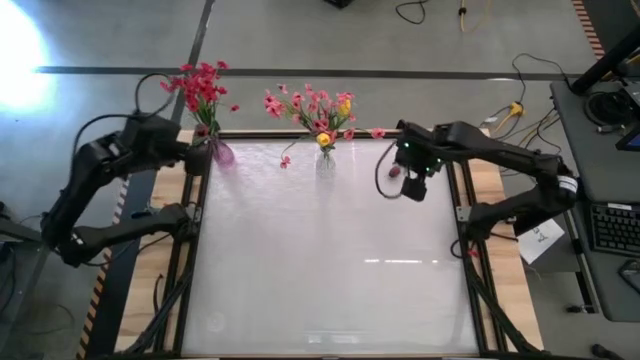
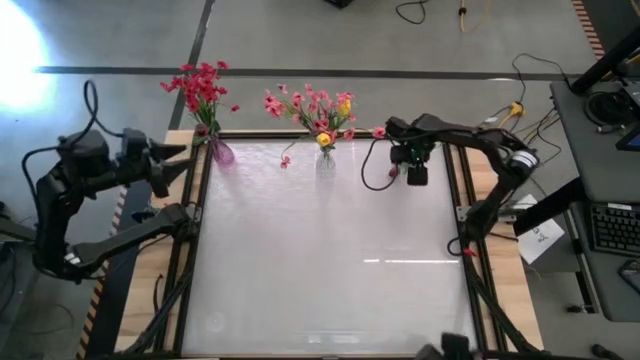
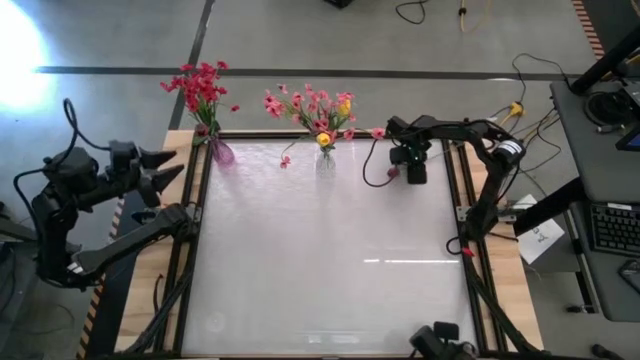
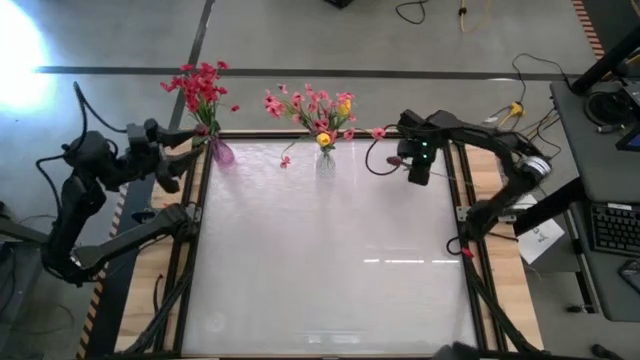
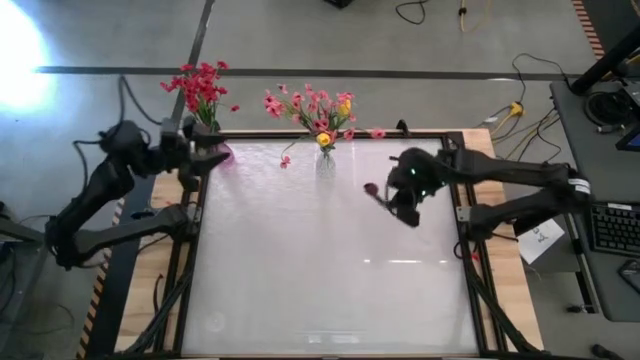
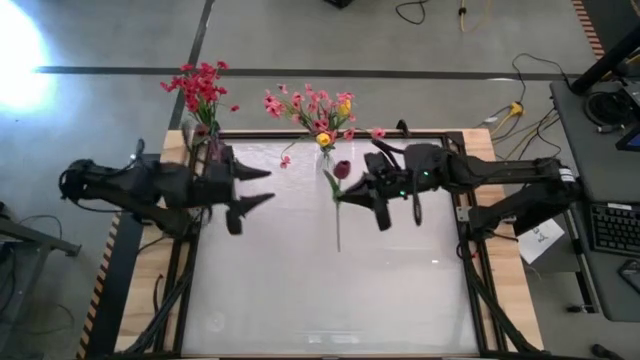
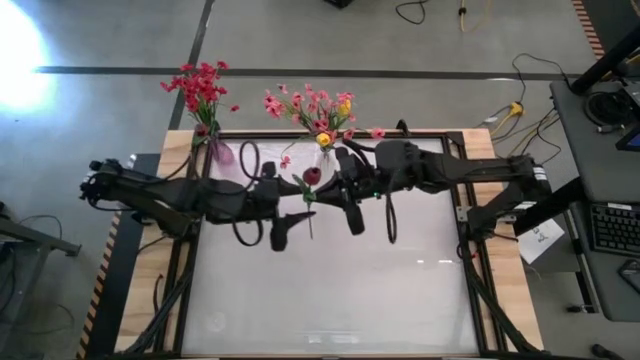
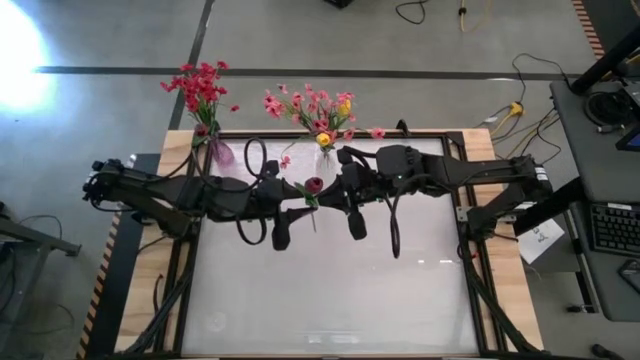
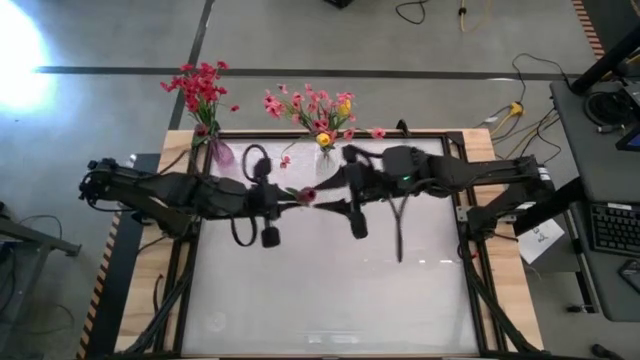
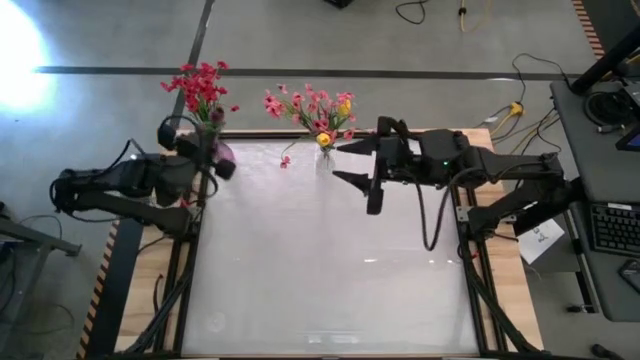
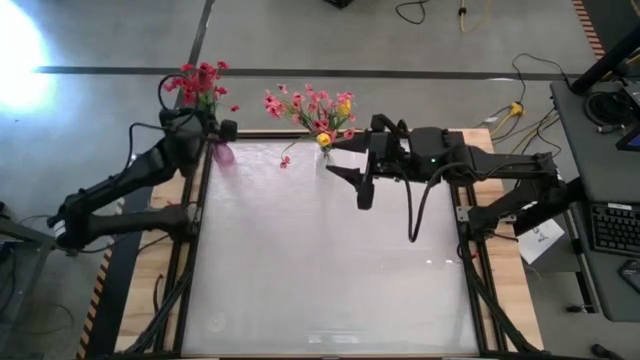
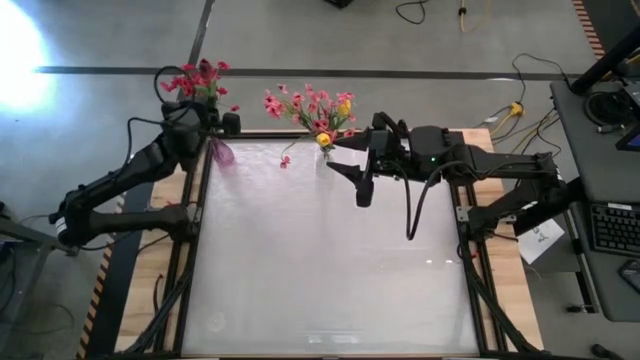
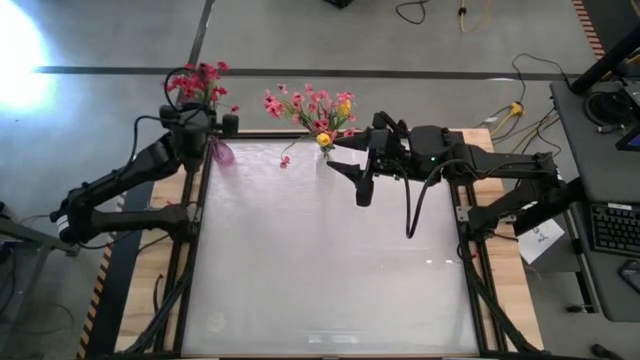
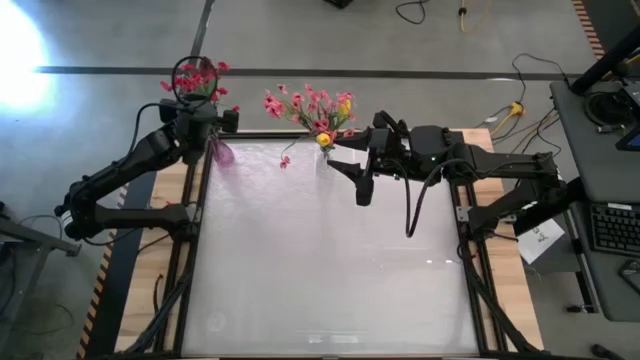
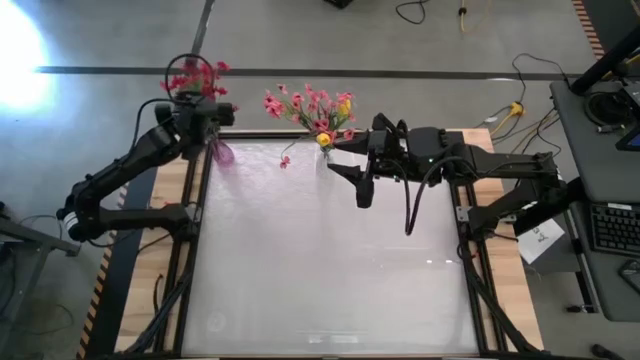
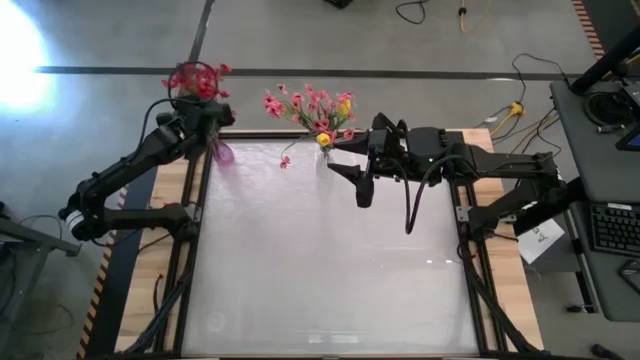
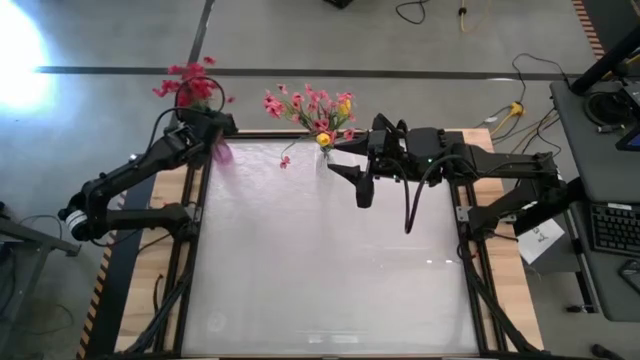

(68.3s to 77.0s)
Task: Sort flowers into vase by color
Put the red tulip into the purple vase

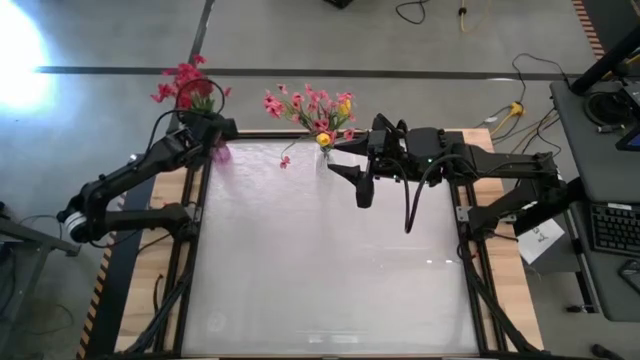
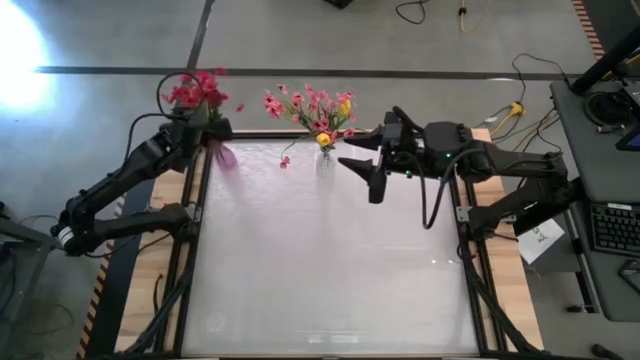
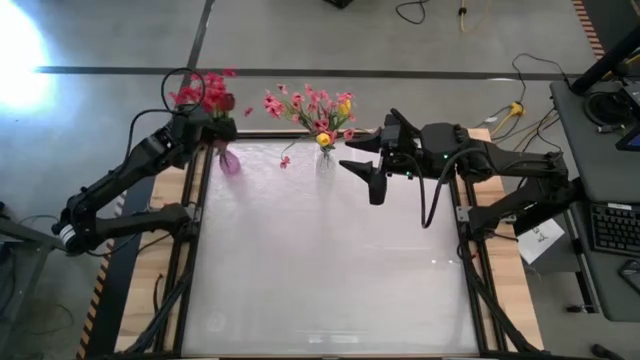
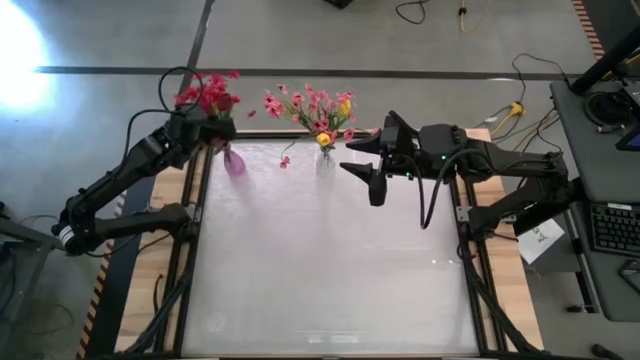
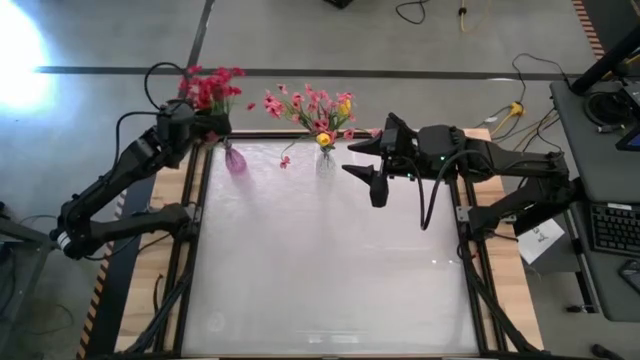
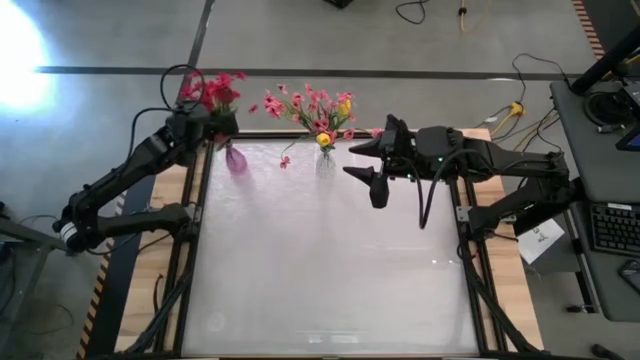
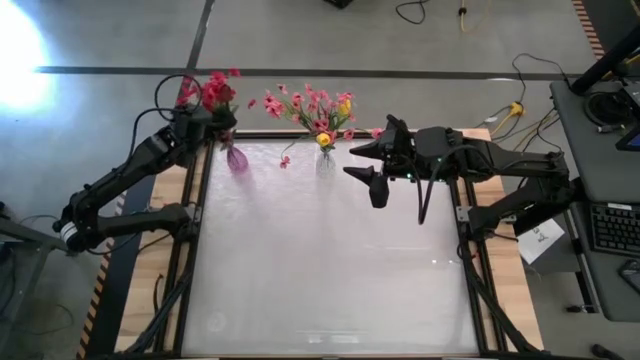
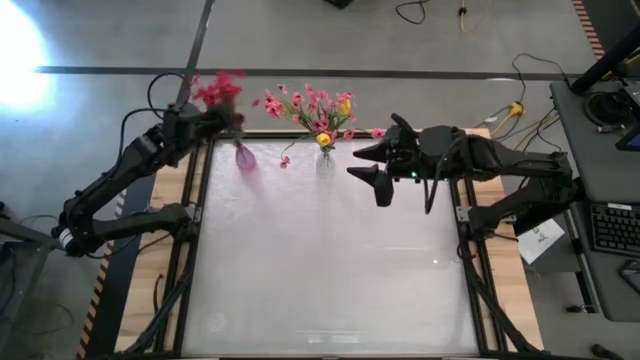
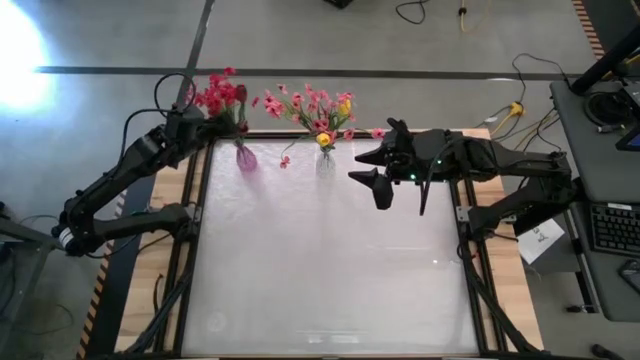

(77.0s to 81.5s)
Adjust the red flowers

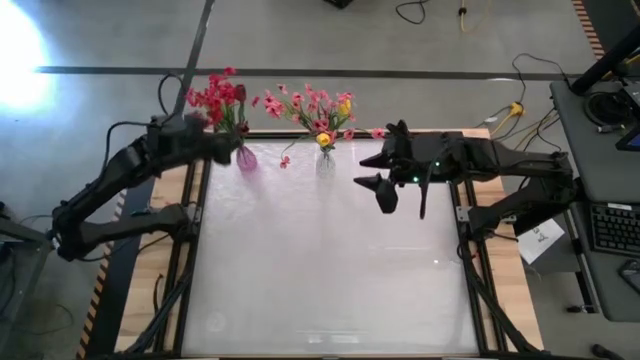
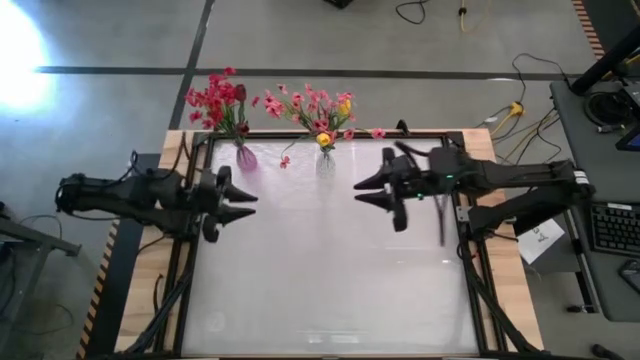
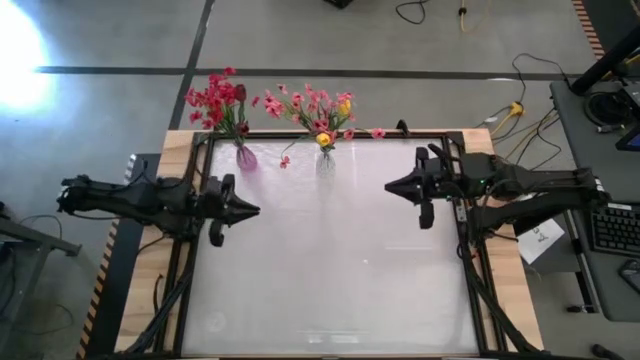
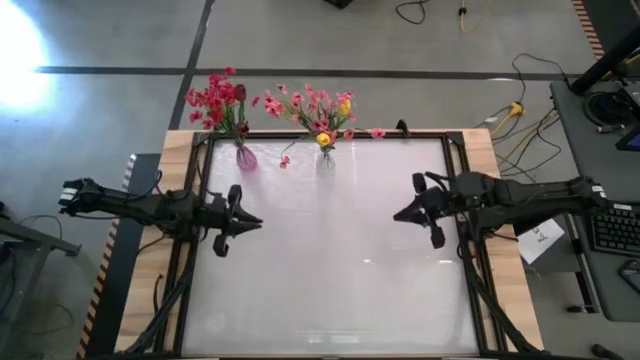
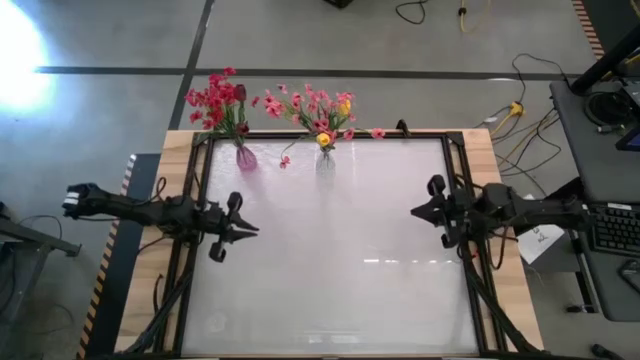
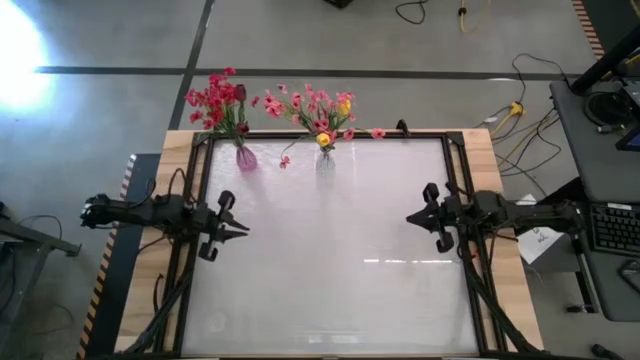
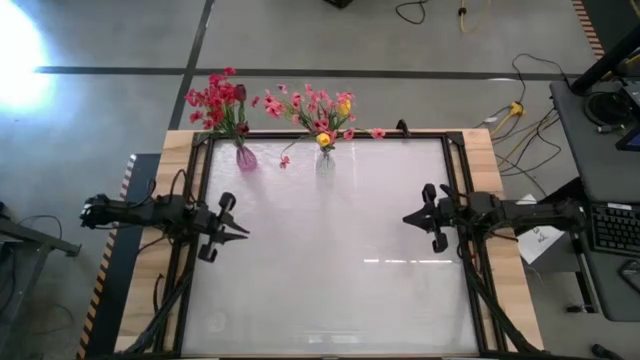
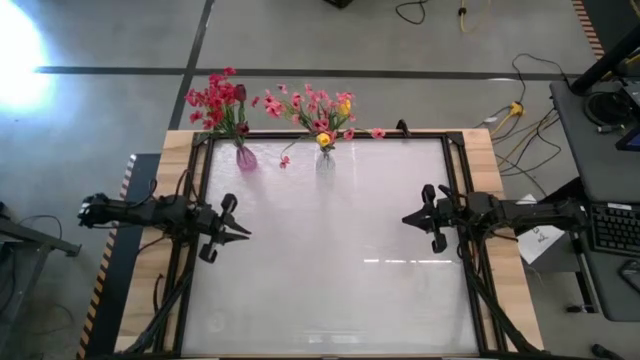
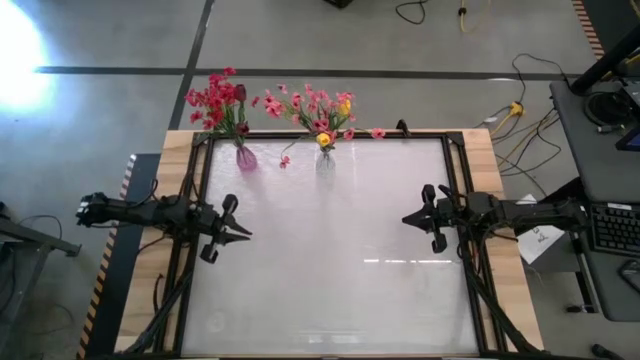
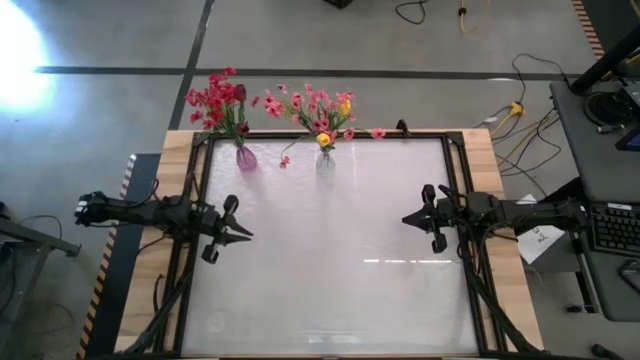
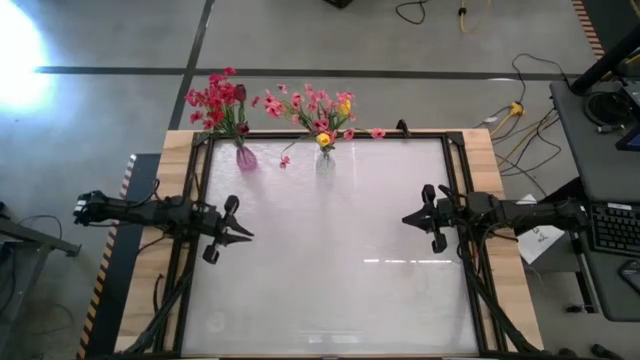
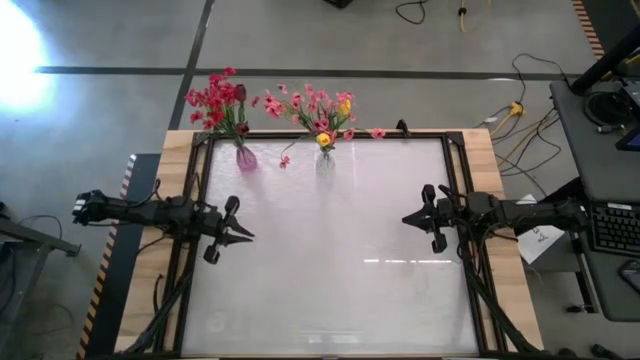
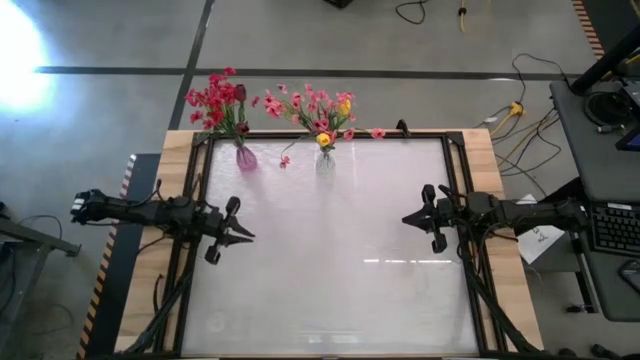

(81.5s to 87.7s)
Return to Home Position

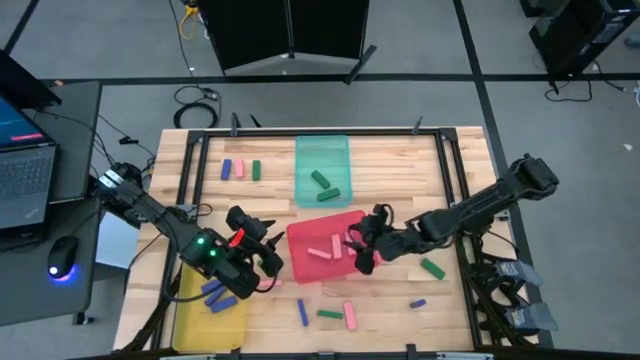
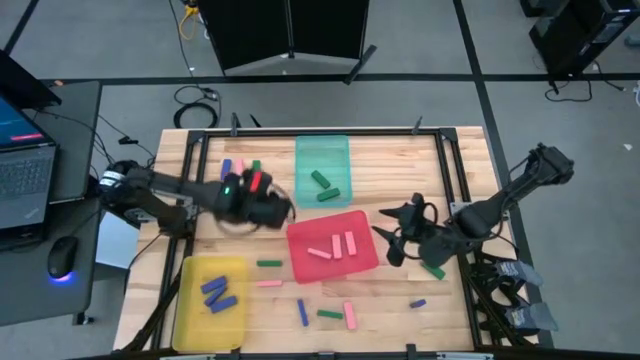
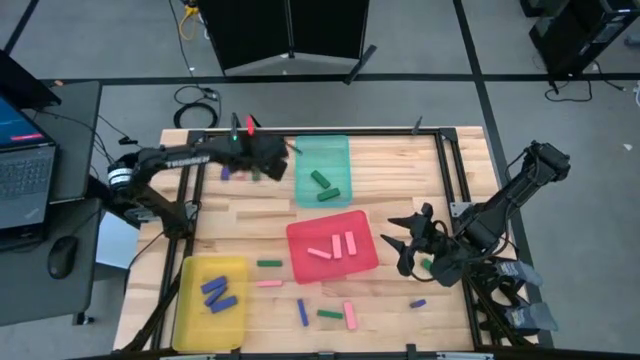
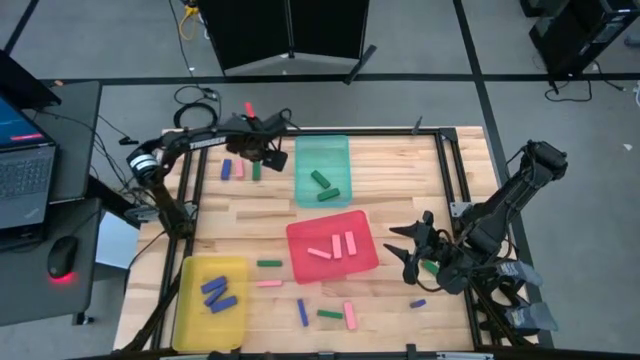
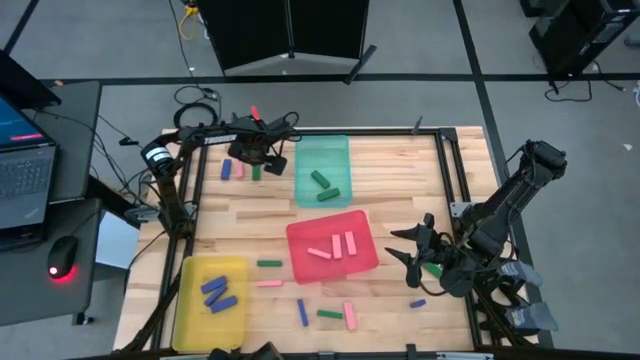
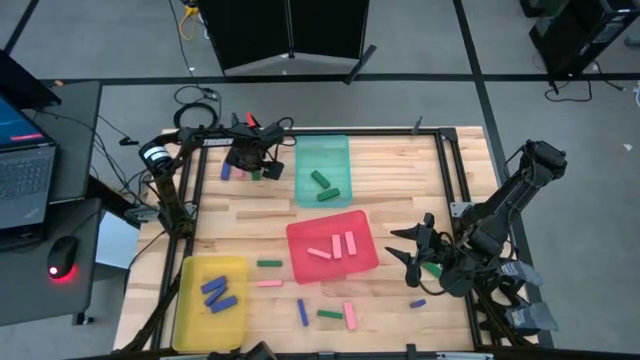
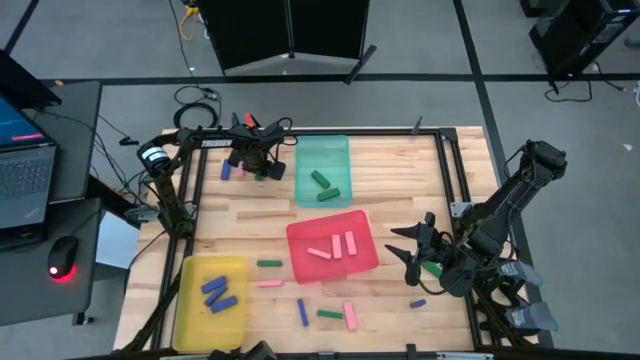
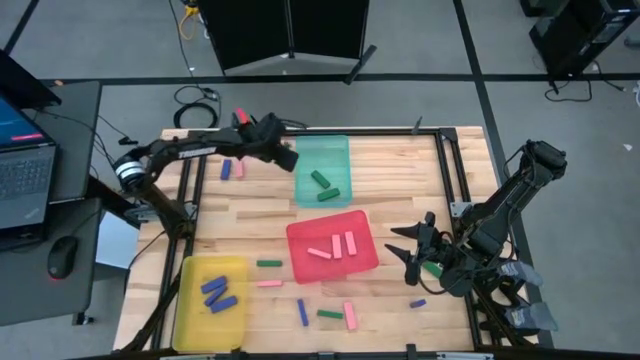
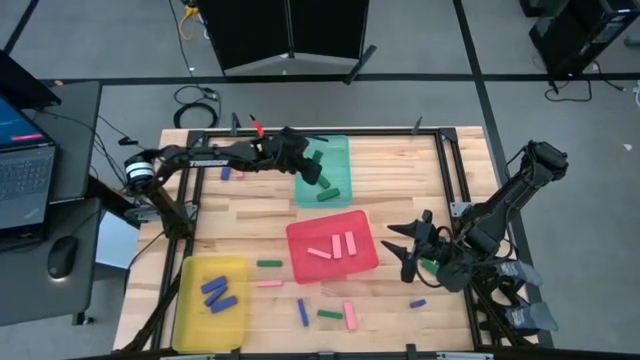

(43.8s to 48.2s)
Task: Sort blocks
Put the green block into the green bin
